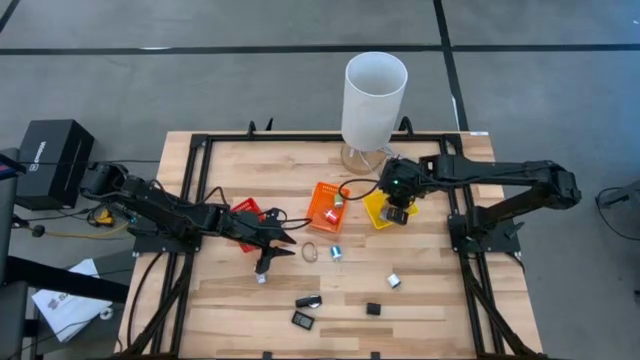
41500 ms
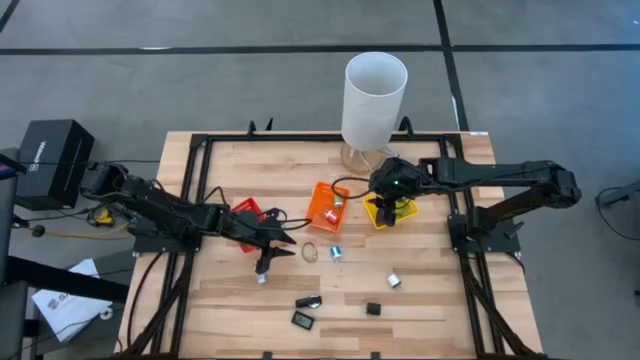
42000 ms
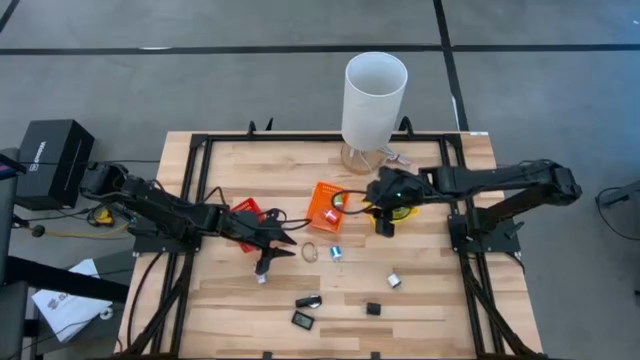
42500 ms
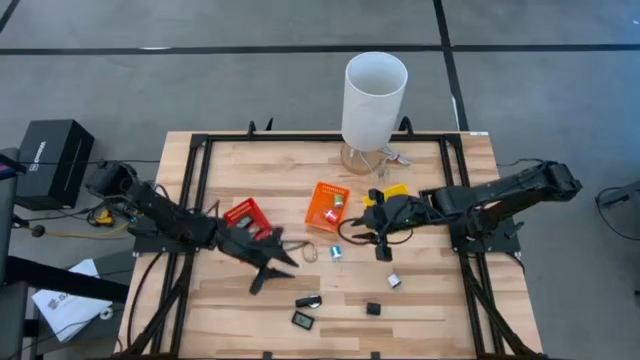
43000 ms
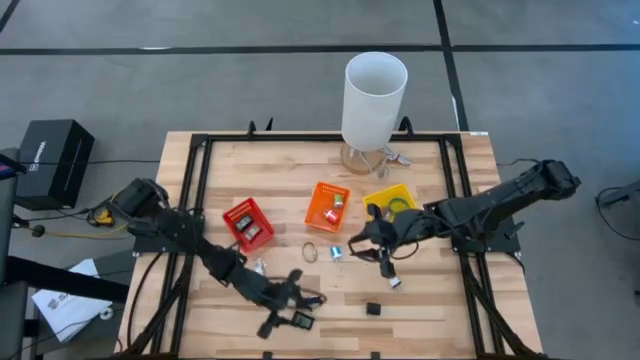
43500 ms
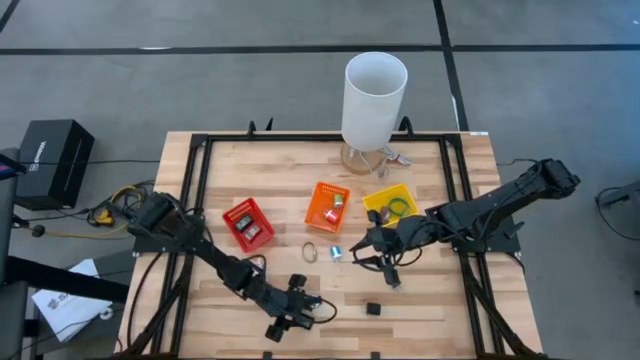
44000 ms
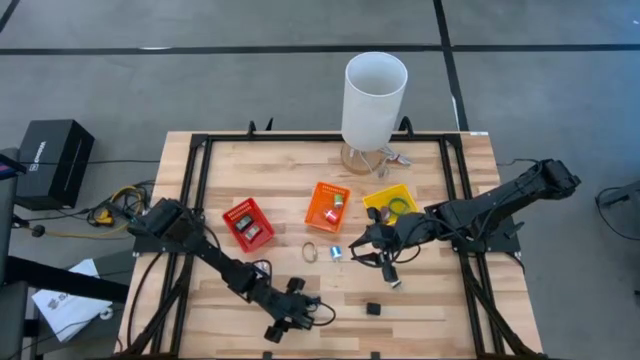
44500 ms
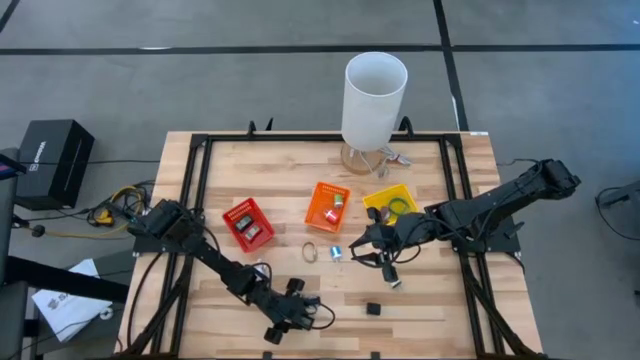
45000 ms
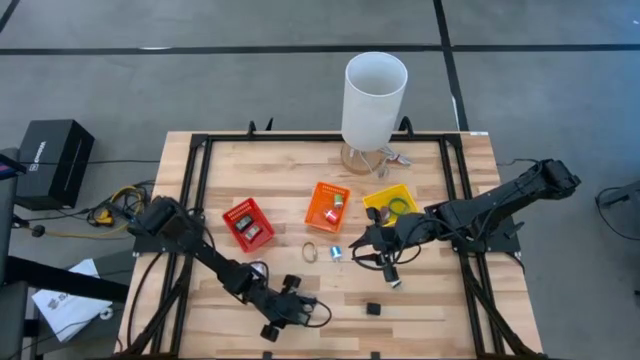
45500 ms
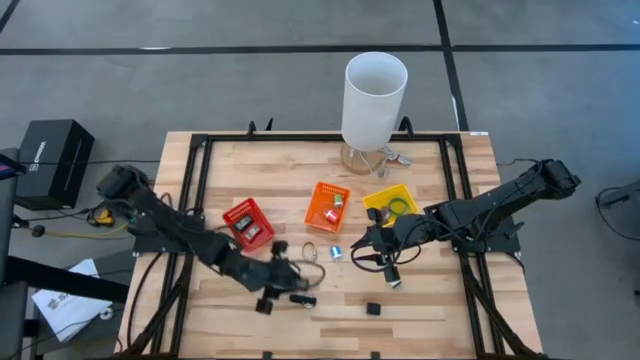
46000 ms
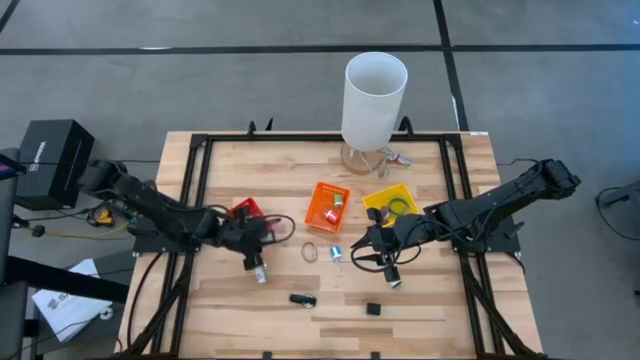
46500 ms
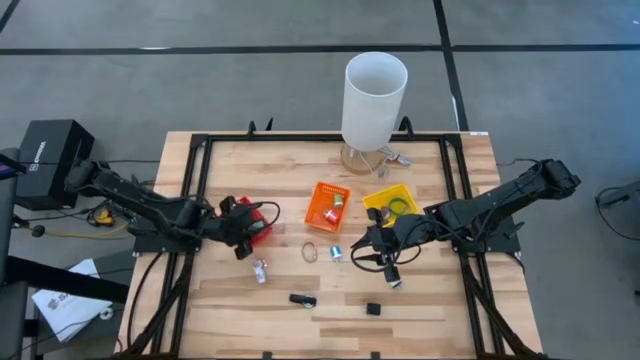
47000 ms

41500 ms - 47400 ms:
Task: Pick & Place Office items
Put the black digital clock into the red bin

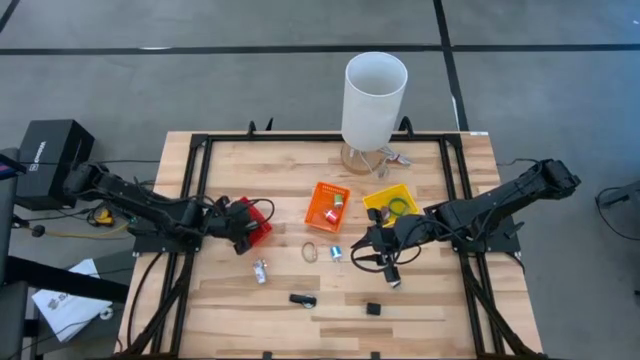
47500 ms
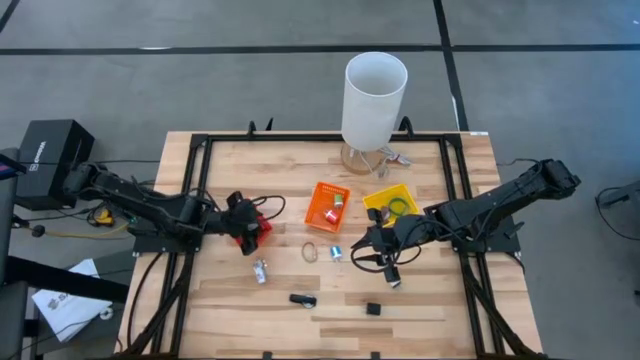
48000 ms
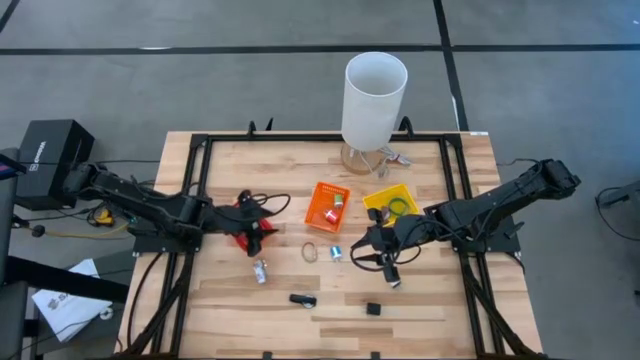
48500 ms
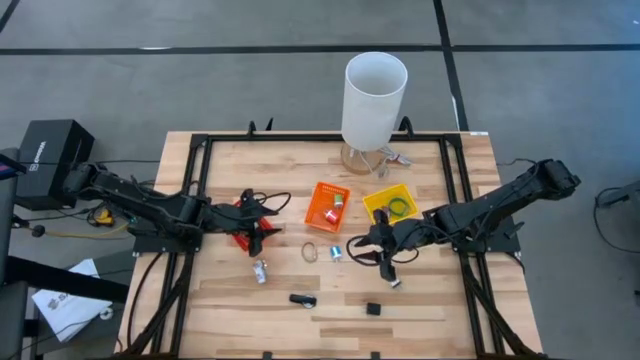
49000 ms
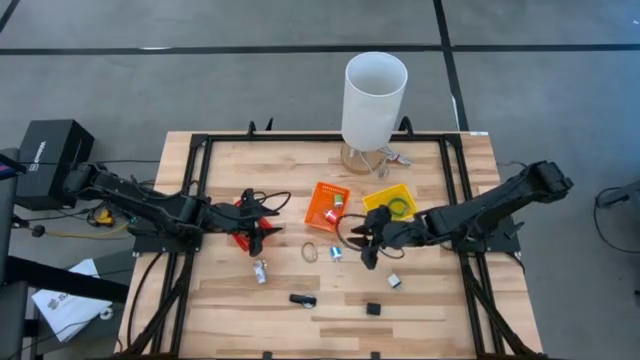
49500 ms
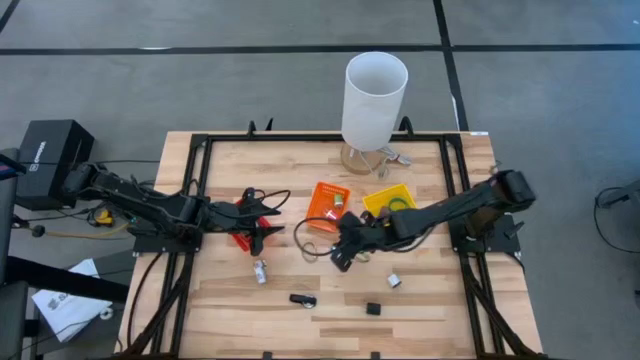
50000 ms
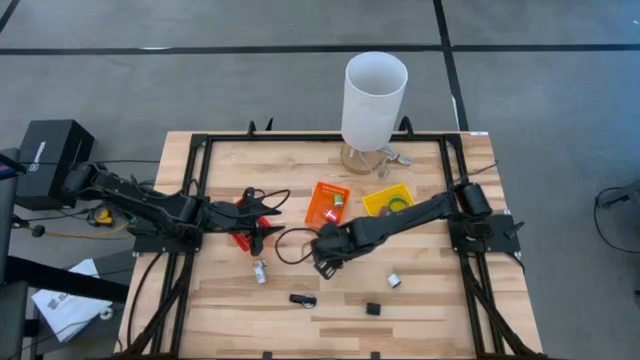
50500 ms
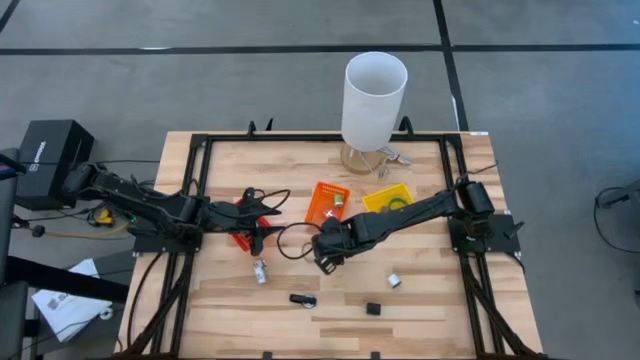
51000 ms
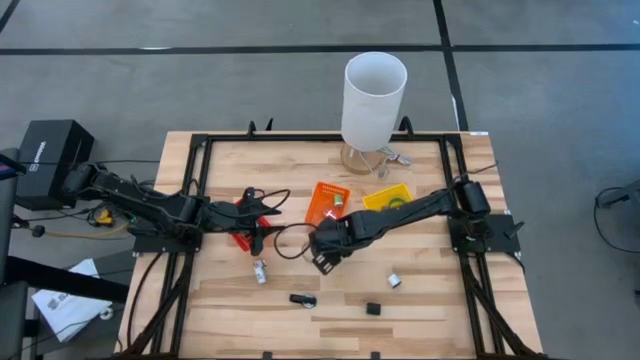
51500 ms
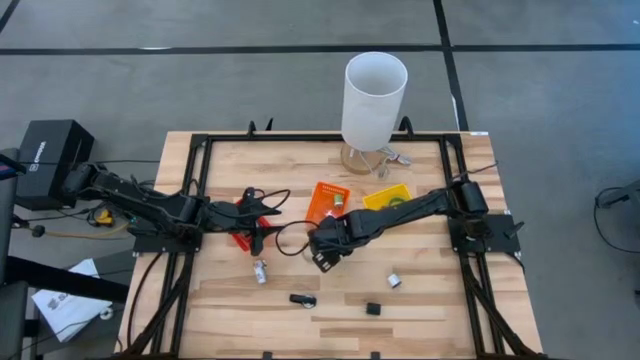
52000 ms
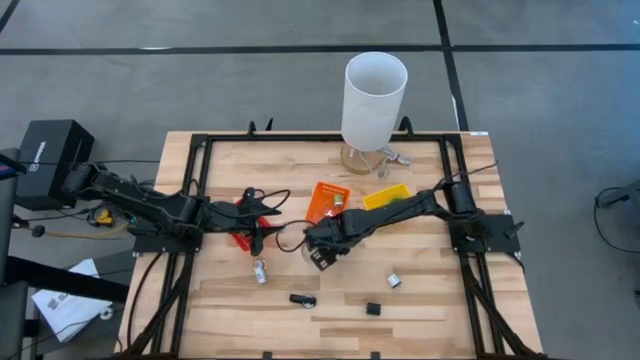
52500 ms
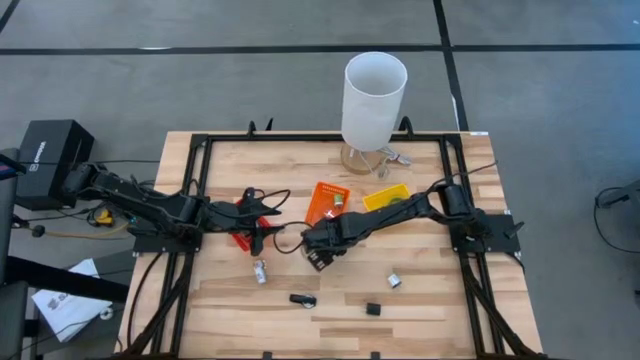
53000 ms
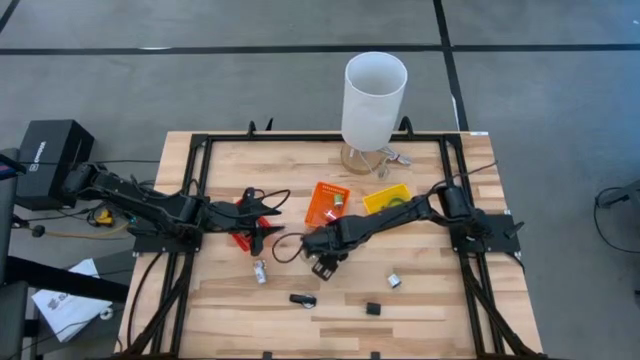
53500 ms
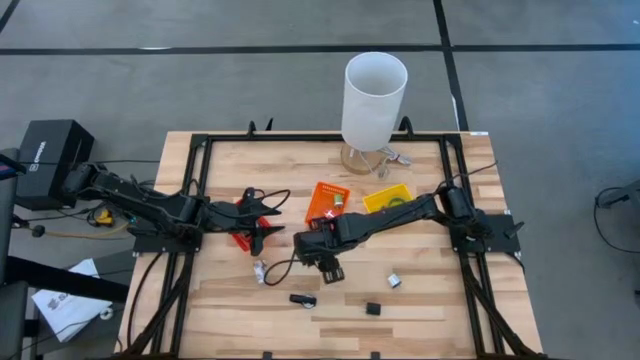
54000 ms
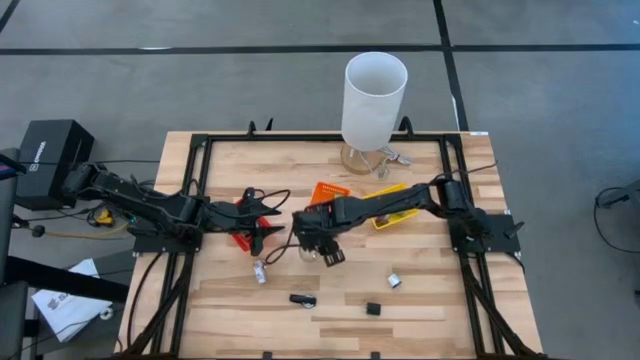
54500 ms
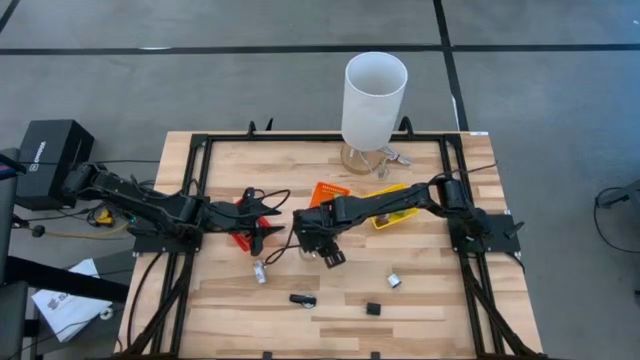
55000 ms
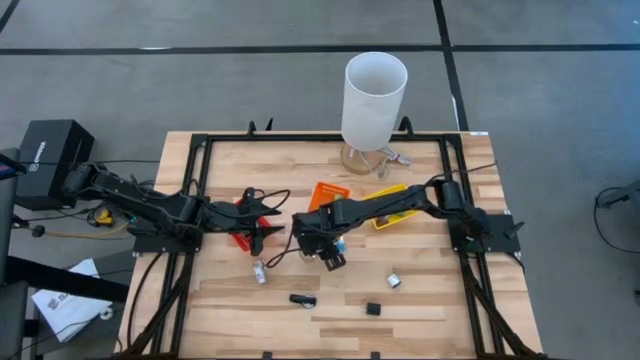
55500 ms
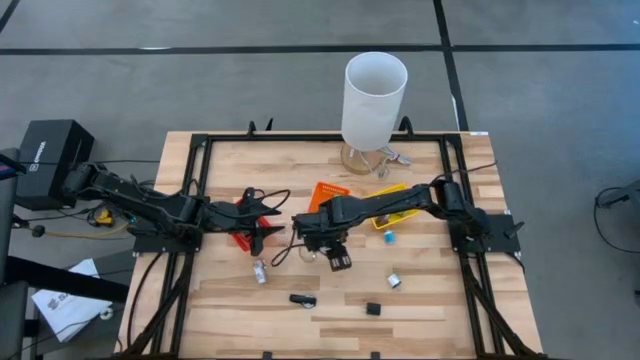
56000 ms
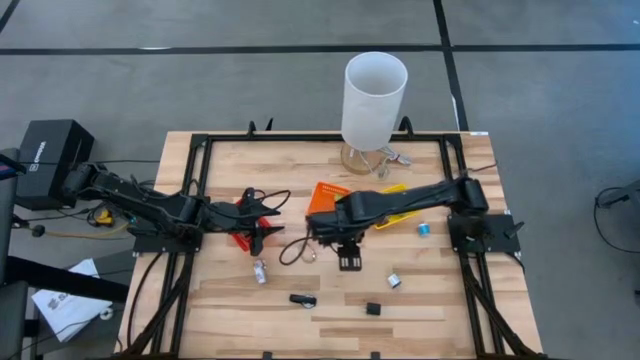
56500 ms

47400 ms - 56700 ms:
Put the blue charger adapter into the orange bin

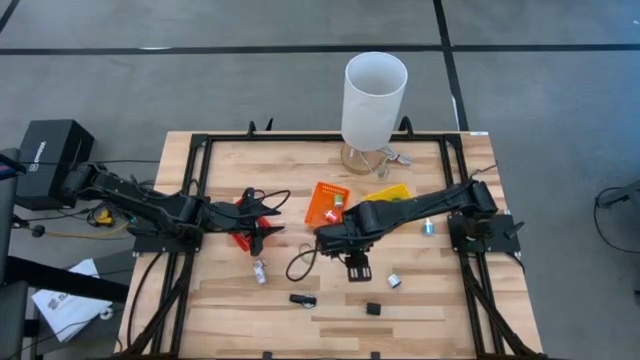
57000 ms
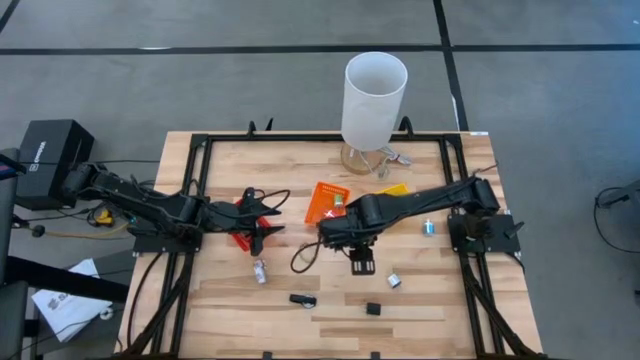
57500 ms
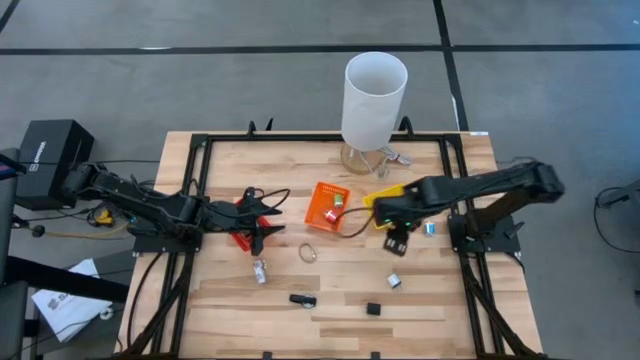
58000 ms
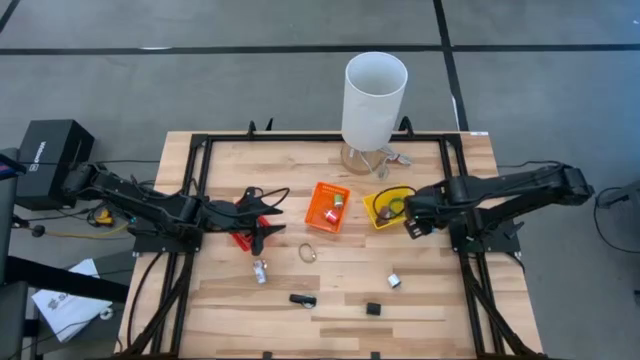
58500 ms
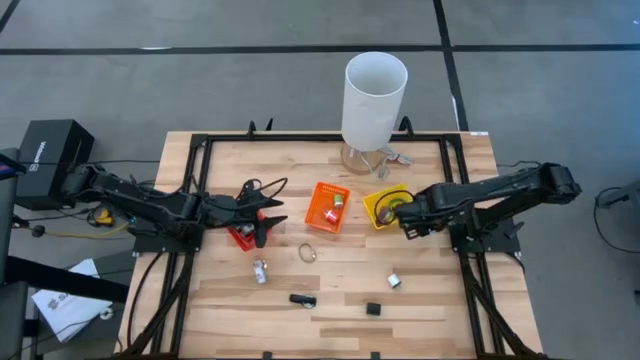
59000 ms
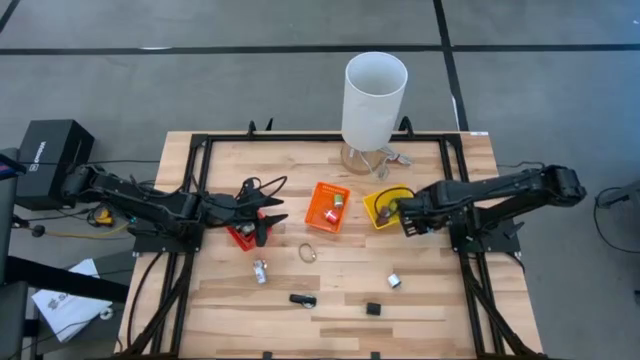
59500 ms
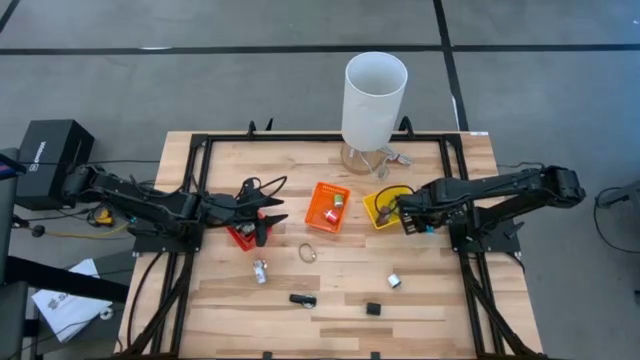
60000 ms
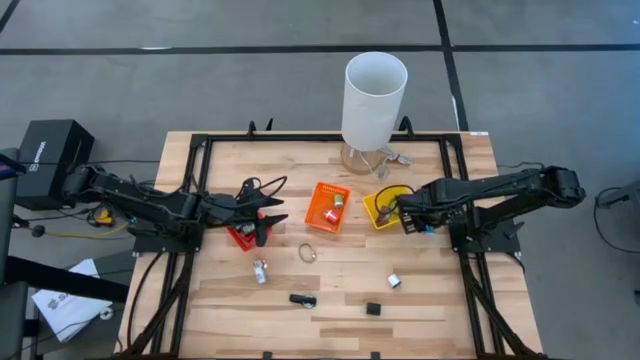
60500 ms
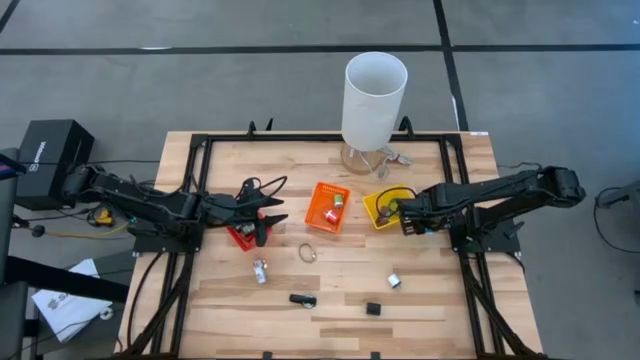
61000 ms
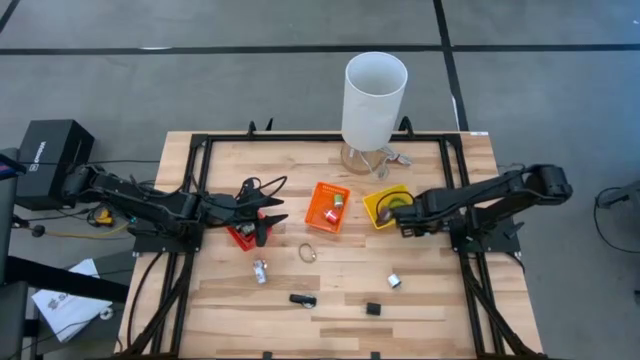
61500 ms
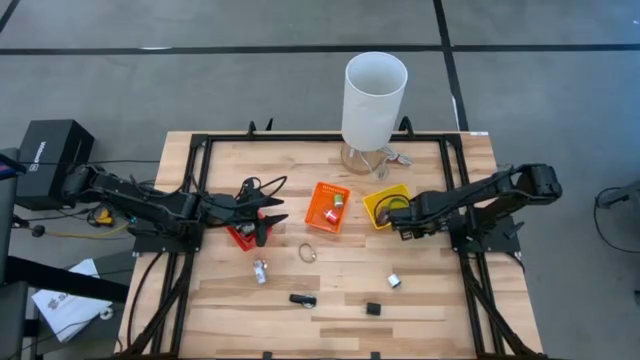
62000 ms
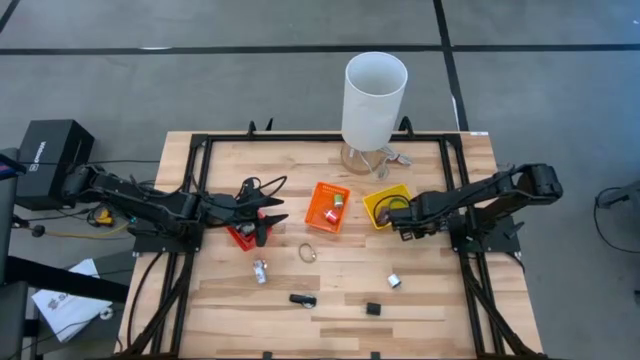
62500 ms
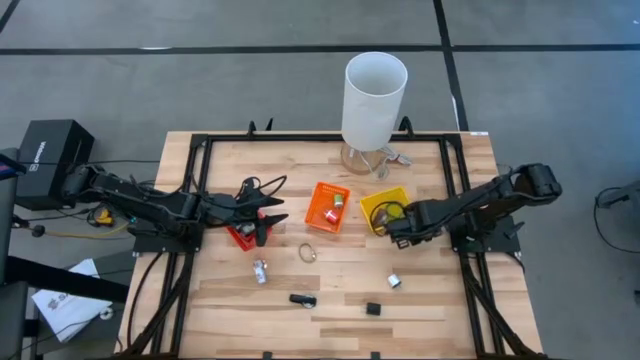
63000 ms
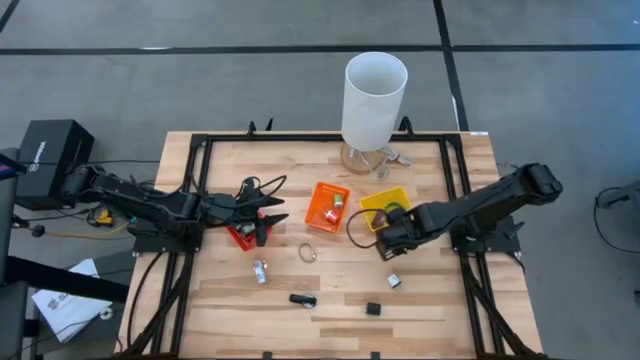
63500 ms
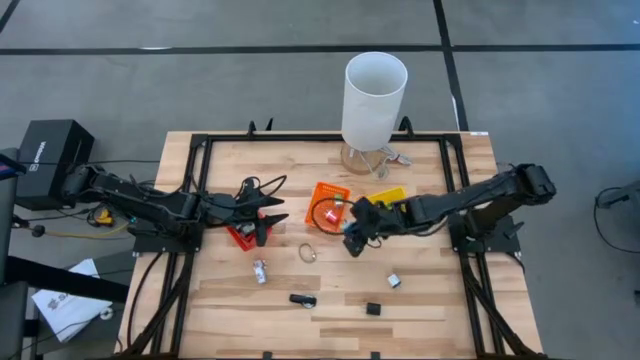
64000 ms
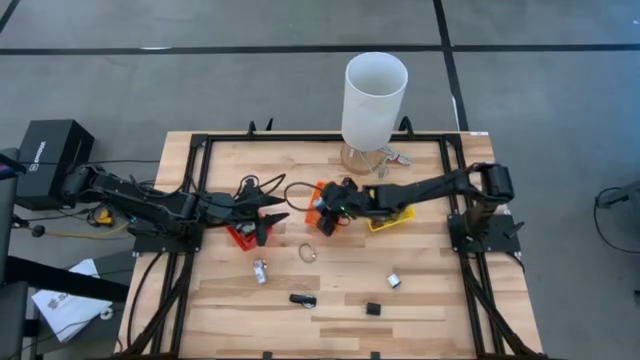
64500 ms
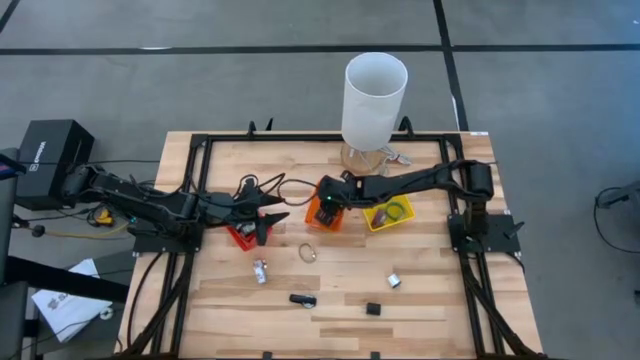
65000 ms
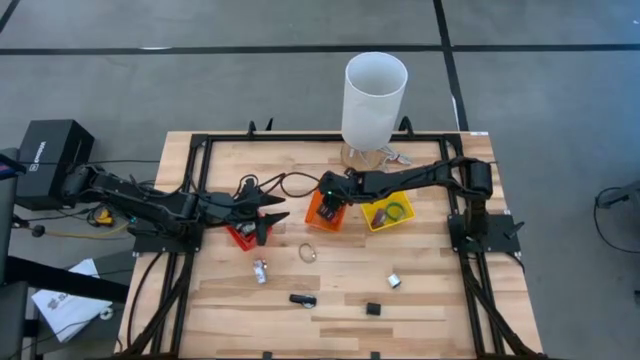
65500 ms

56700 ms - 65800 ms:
Put the blue charger adapter into the orange bin
